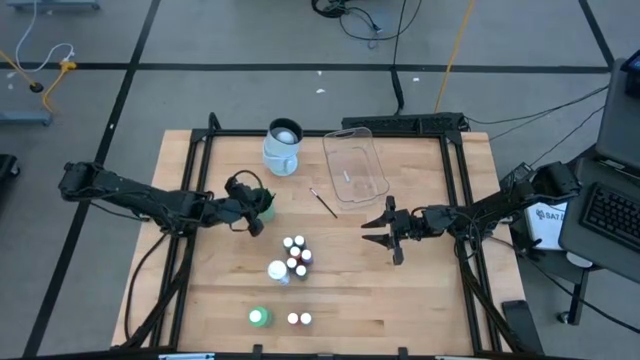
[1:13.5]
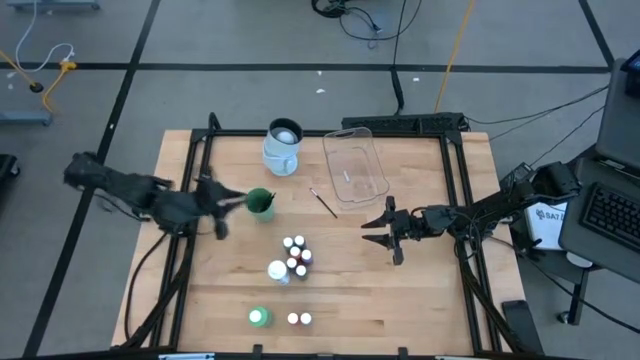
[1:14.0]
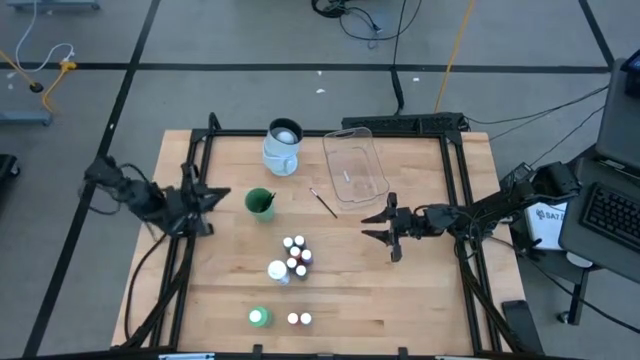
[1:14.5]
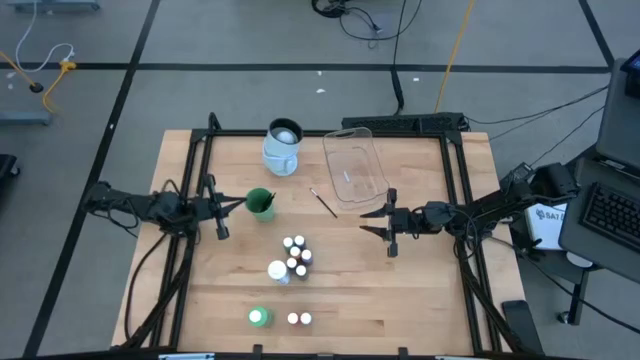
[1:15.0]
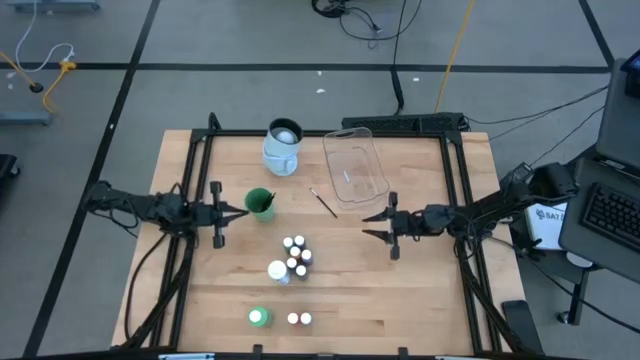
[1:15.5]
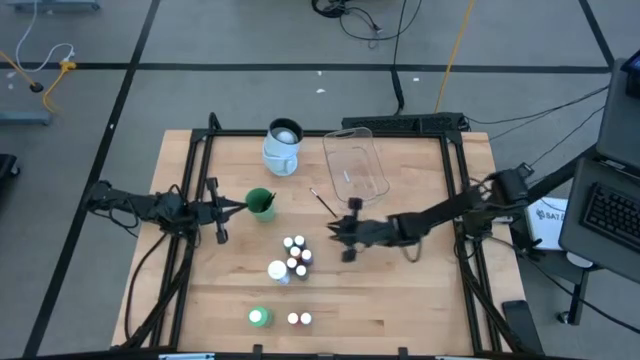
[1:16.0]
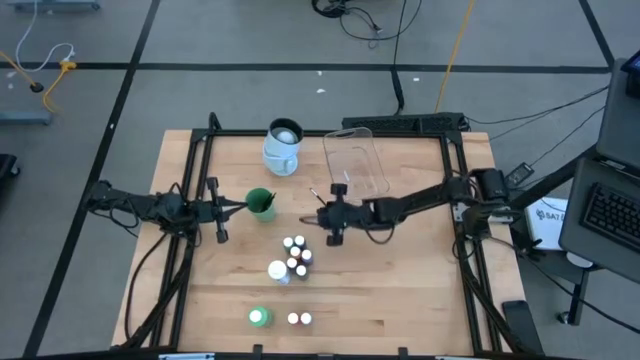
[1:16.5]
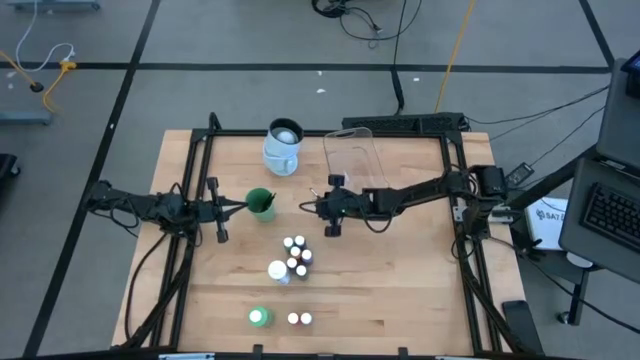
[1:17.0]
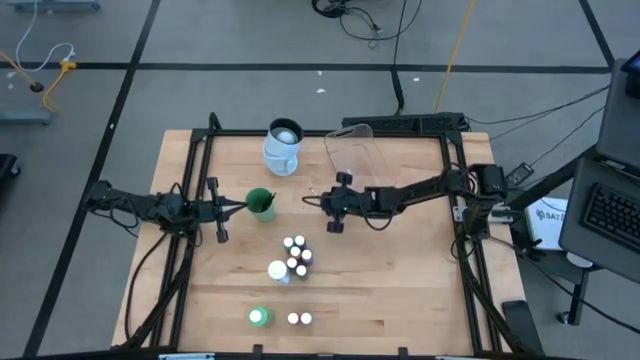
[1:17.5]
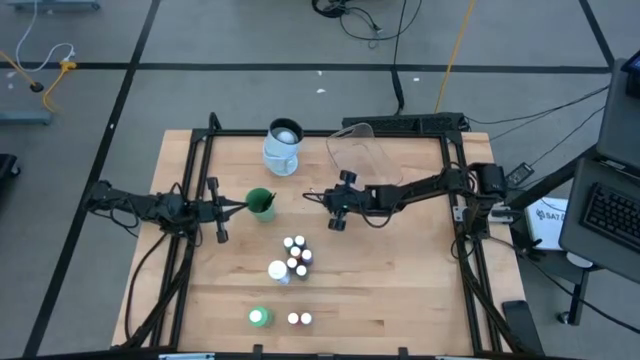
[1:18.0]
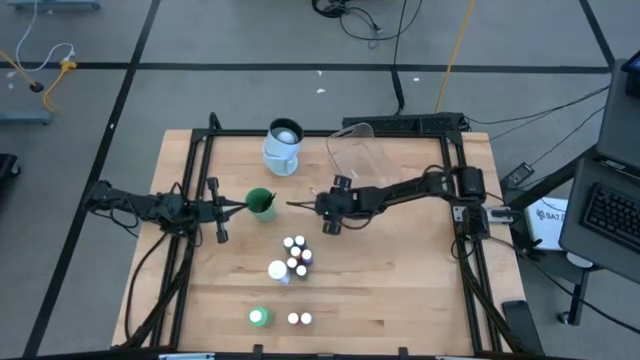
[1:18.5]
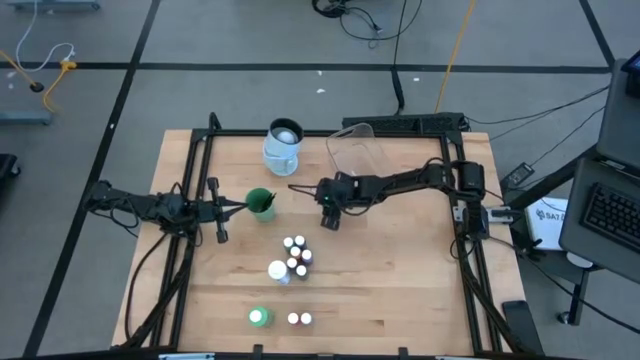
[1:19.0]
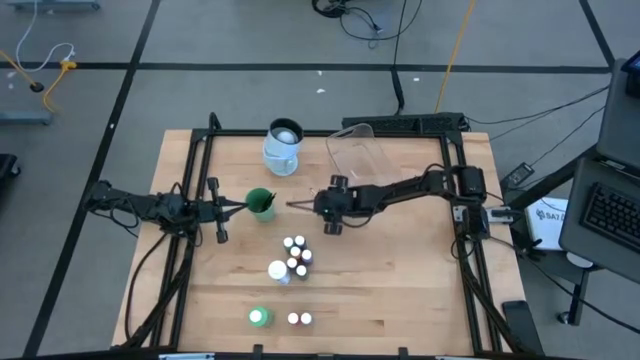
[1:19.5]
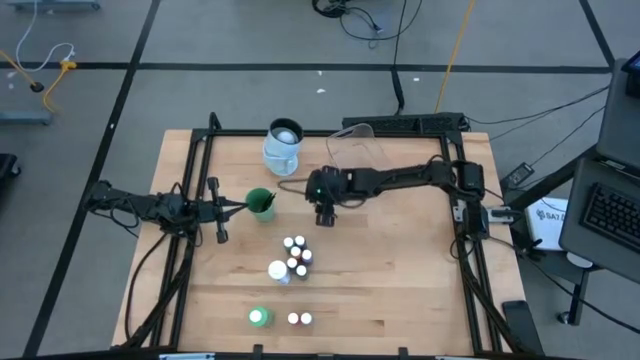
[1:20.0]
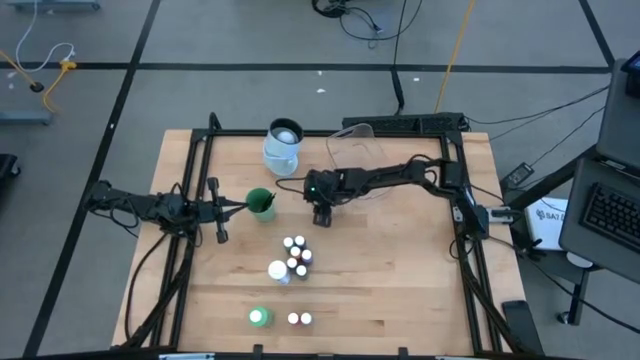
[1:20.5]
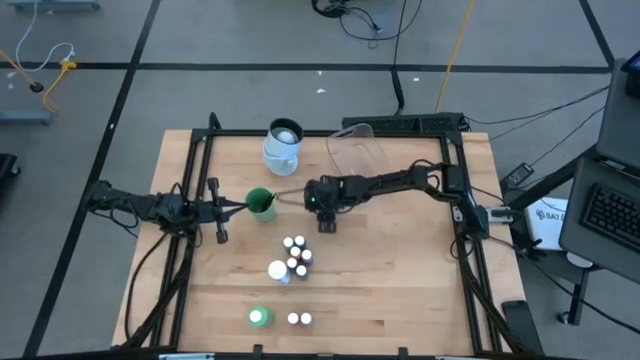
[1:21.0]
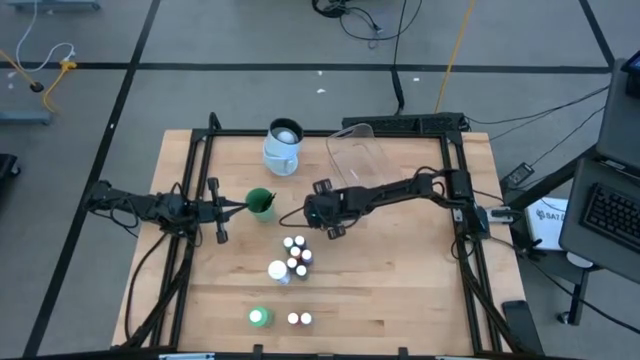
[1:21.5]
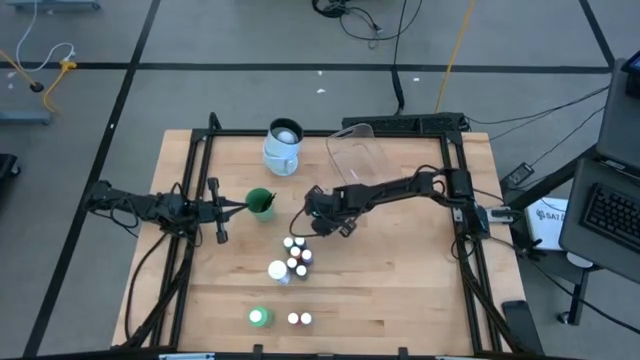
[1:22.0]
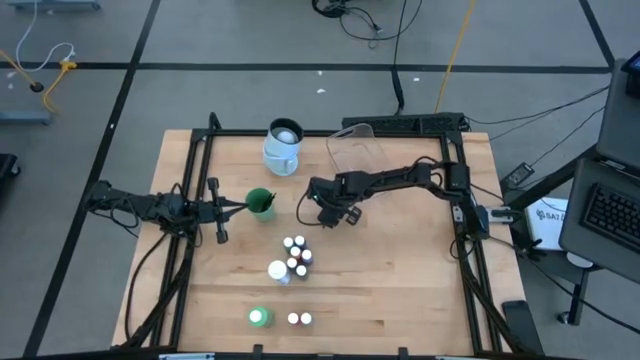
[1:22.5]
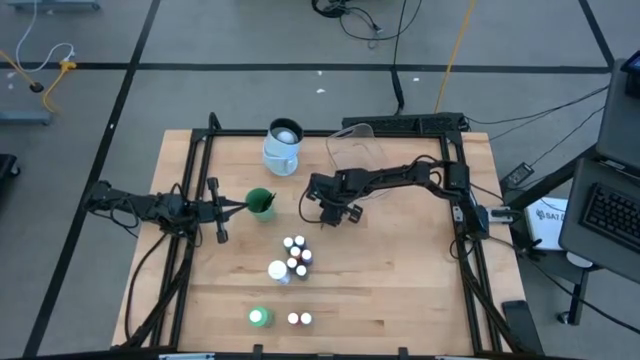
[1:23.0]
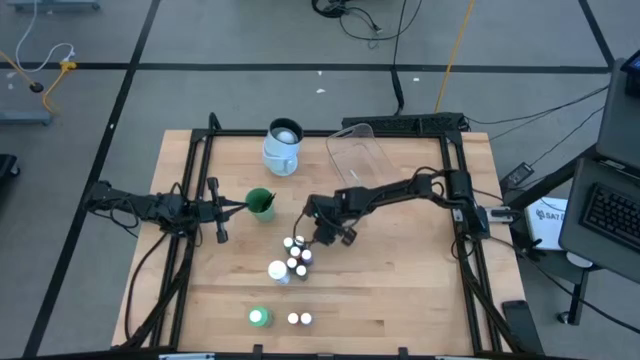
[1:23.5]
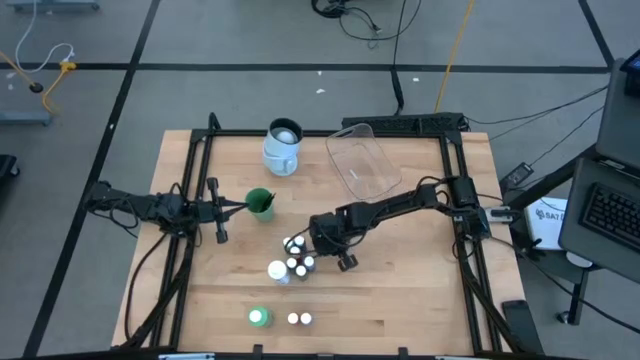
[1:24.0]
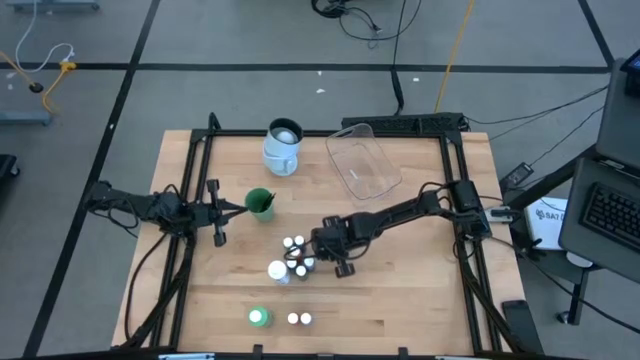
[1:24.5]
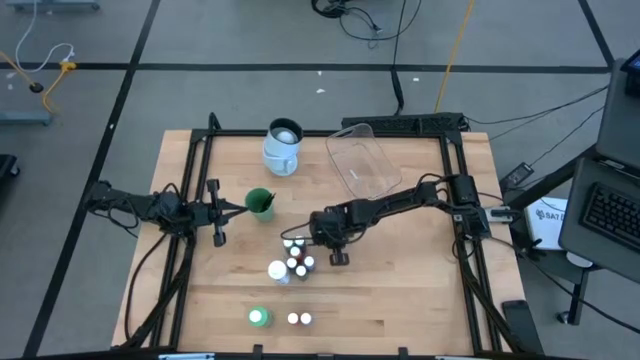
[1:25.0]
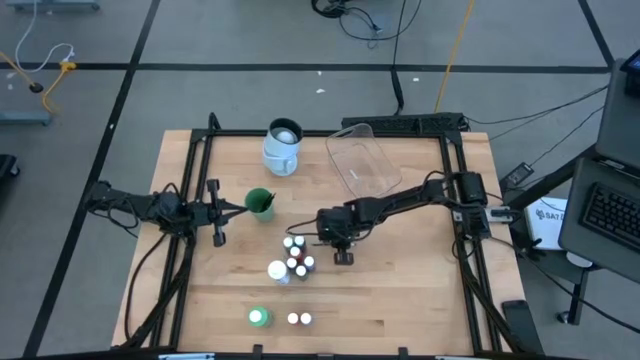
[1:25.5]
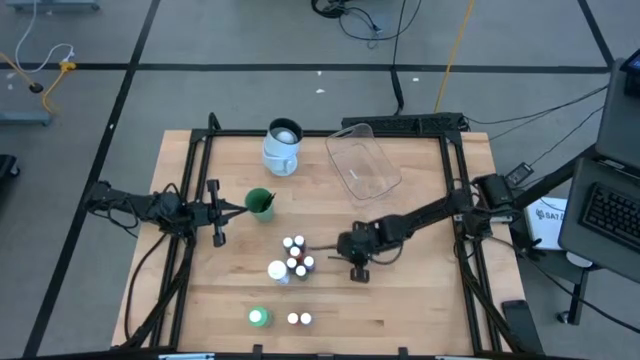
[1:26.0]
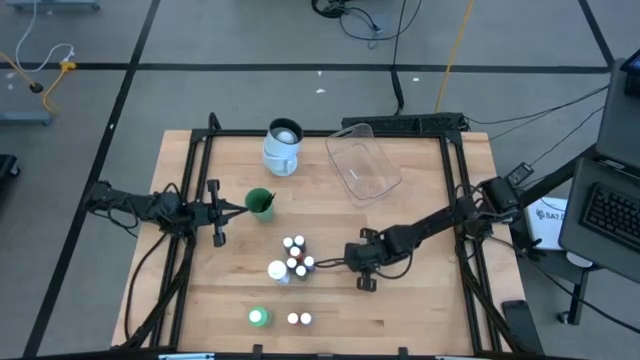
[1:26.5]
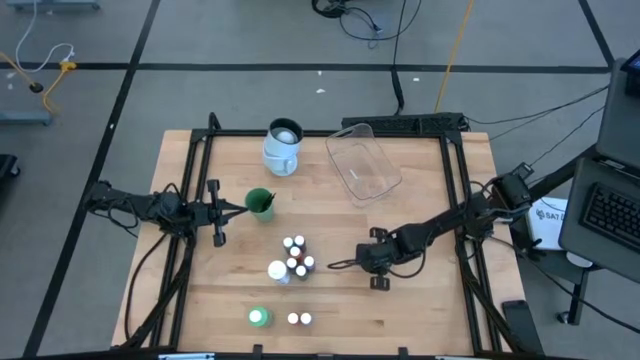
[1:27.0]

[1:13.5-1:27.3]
Task: Pick & Place Paint Supplies
Put the silver paintbrush into the green cup

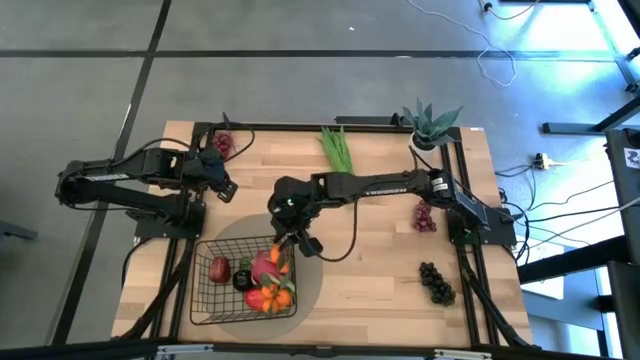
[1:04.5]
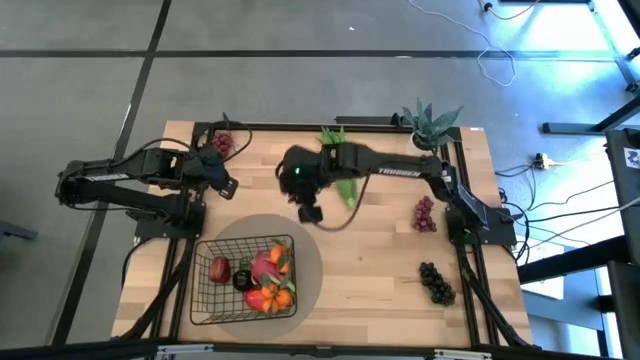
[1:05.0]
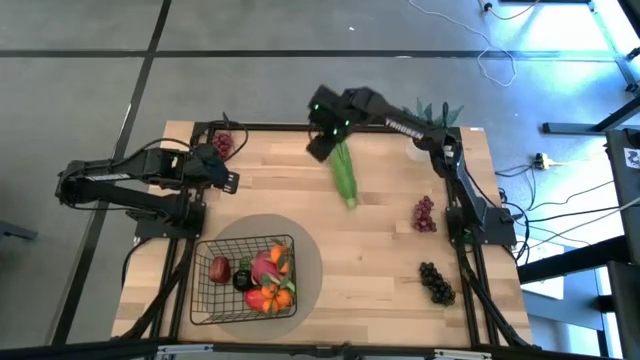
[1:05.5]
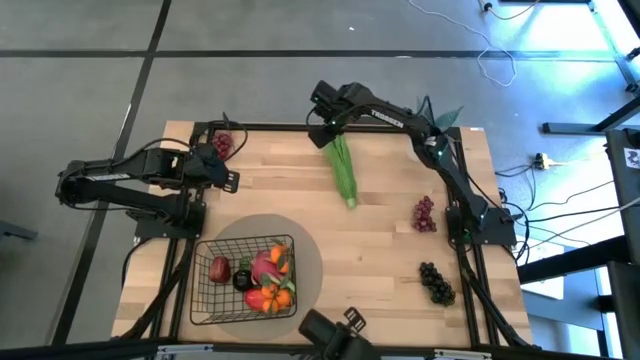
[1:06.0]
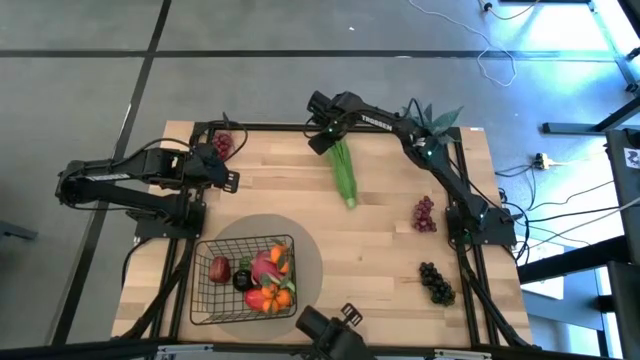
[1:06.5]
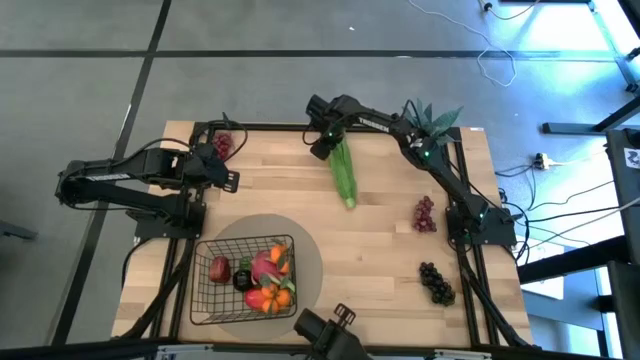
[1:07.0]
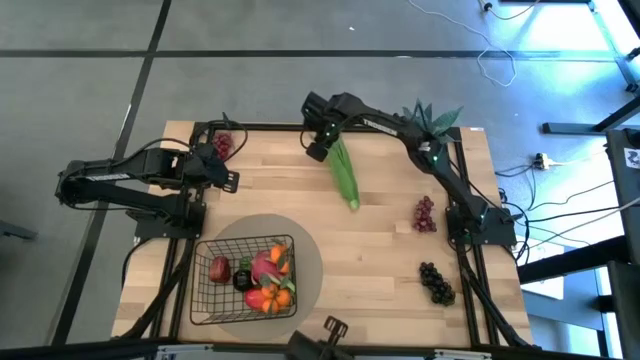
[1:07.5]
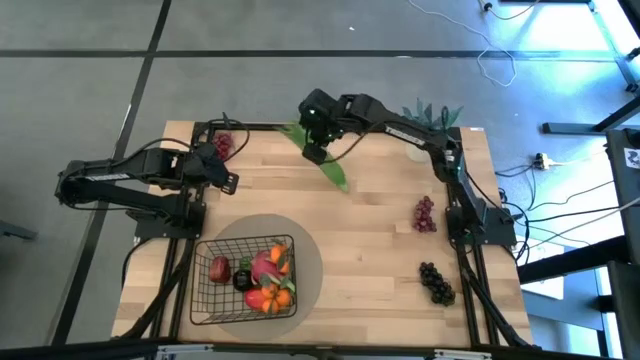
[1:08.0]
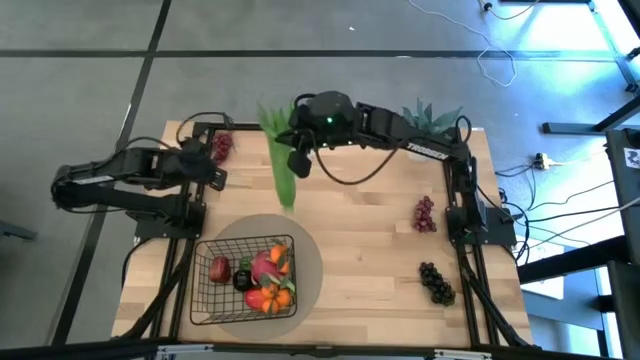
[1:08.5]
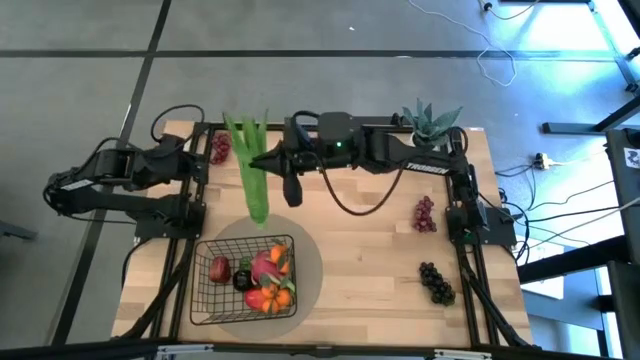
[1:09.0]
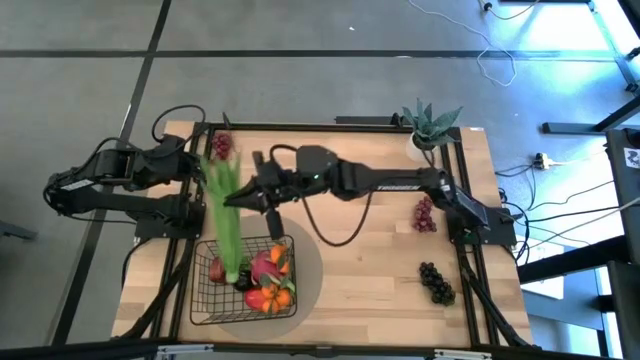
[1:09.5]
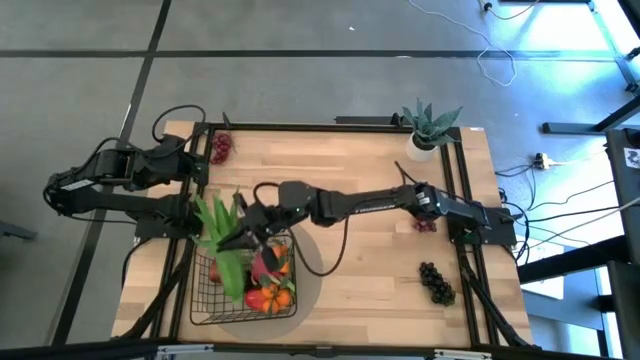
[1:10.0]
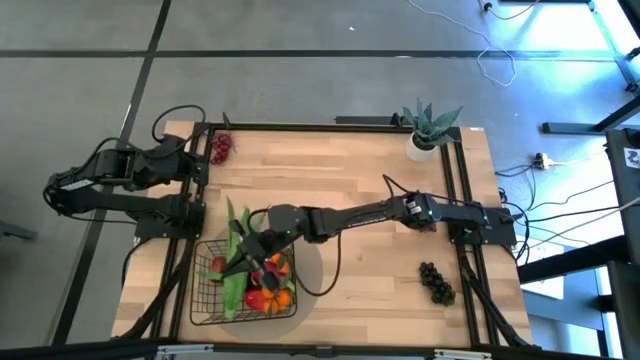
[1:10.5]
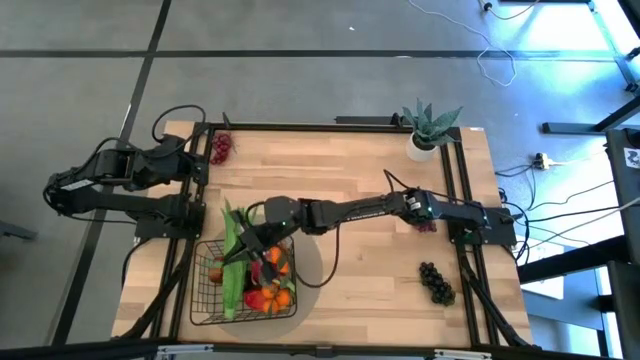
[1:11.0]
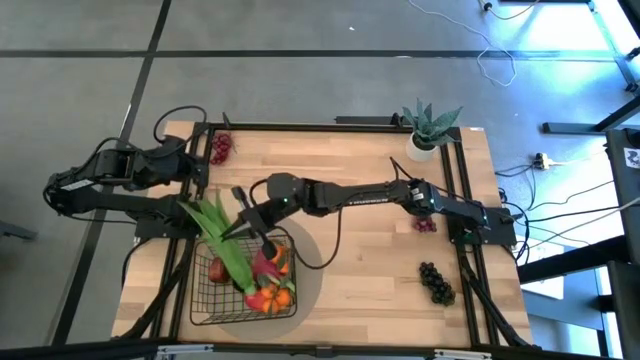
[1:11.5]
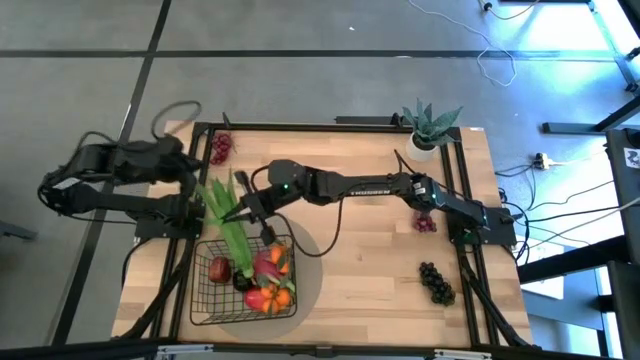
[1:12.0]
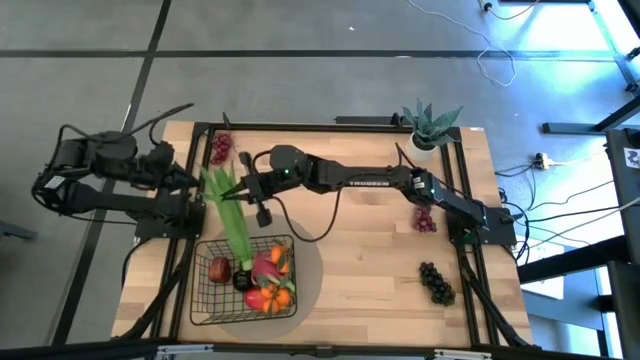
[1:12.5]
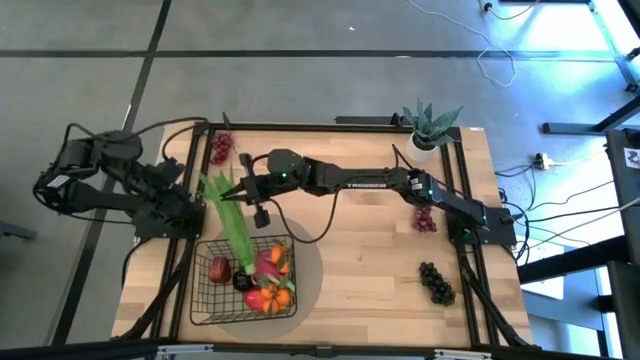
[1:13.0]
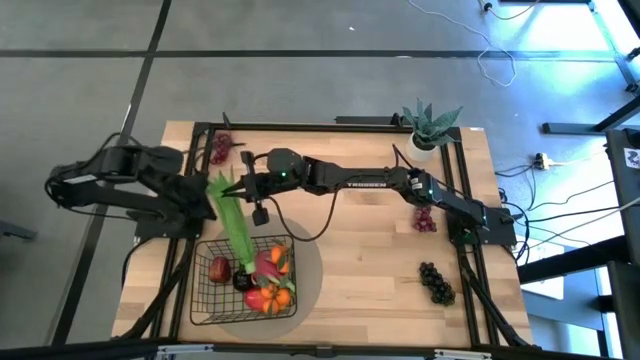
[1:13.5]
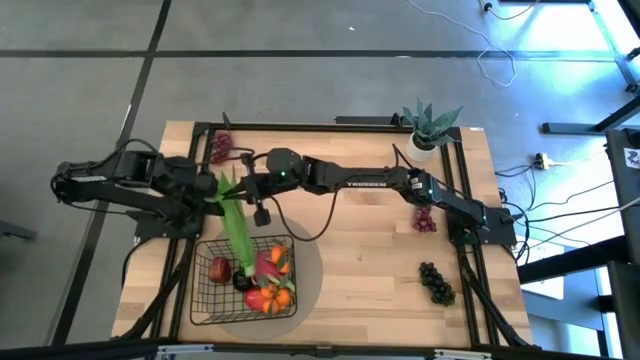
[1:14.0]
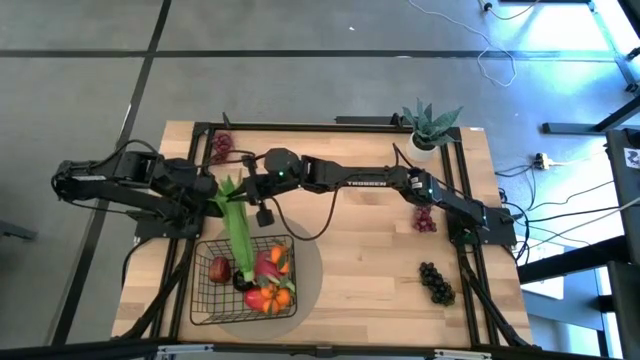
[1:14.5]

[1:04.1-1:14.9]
Task: Build produce basket
Put the green leaf lettuce into the black wire basket
